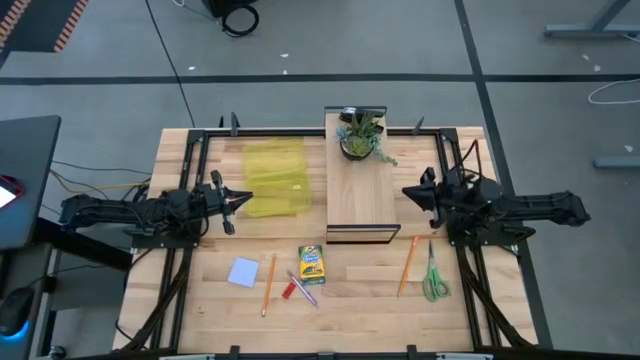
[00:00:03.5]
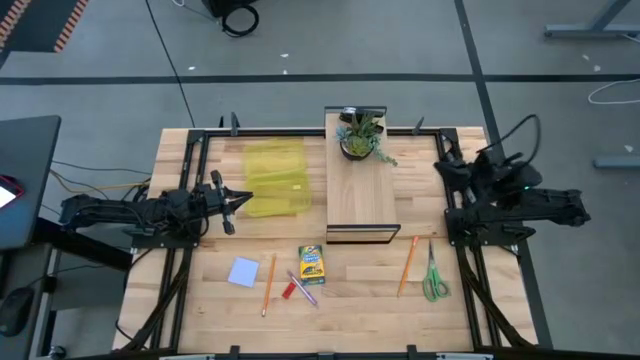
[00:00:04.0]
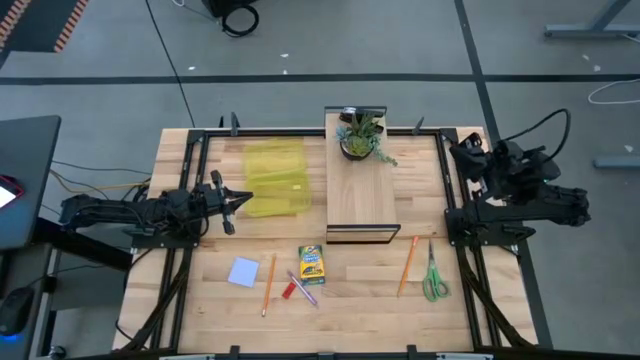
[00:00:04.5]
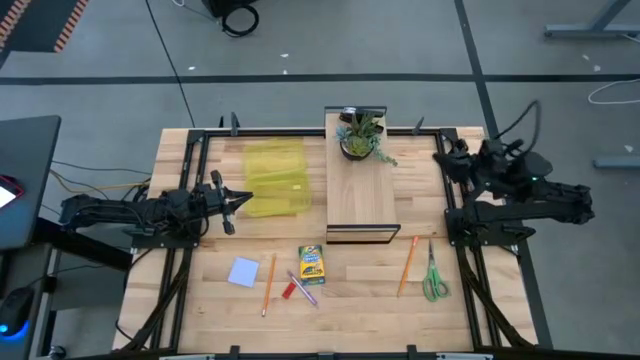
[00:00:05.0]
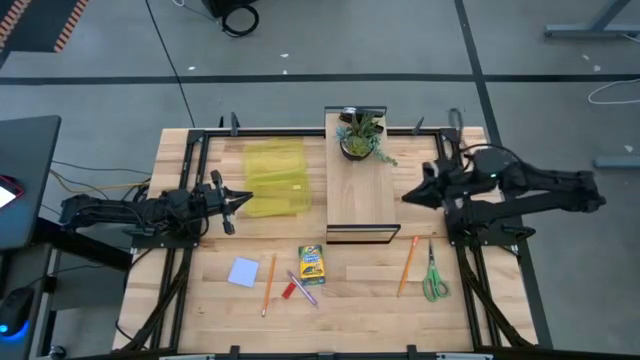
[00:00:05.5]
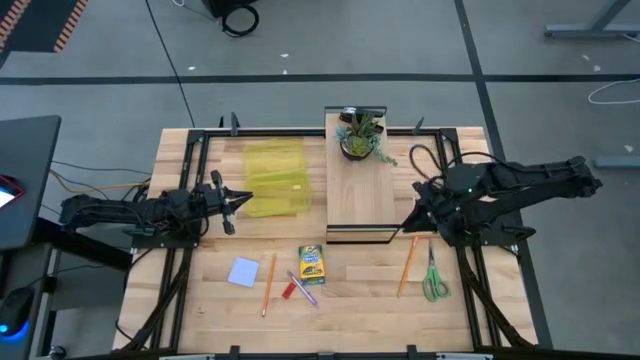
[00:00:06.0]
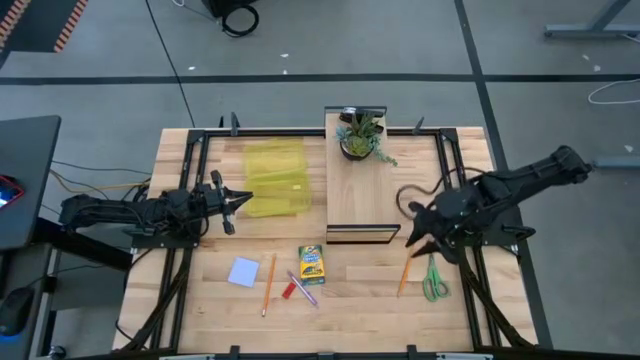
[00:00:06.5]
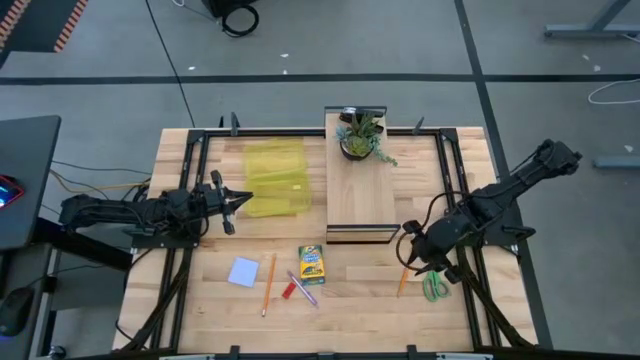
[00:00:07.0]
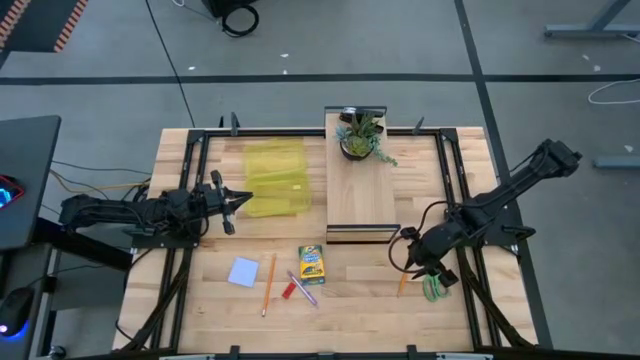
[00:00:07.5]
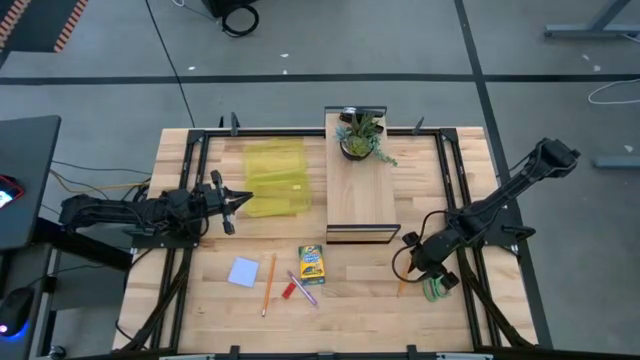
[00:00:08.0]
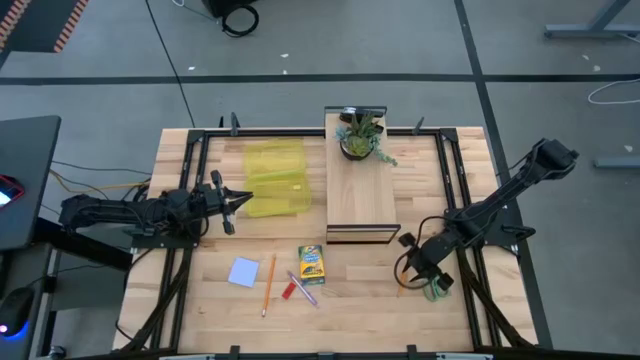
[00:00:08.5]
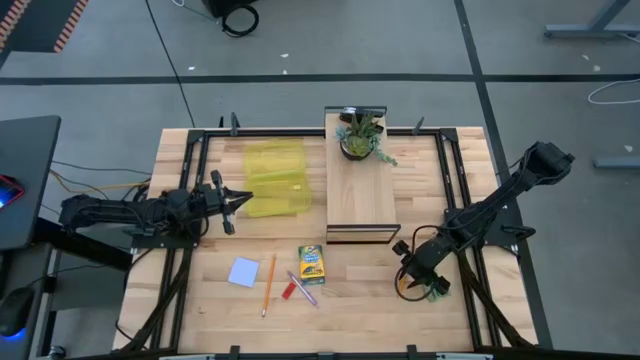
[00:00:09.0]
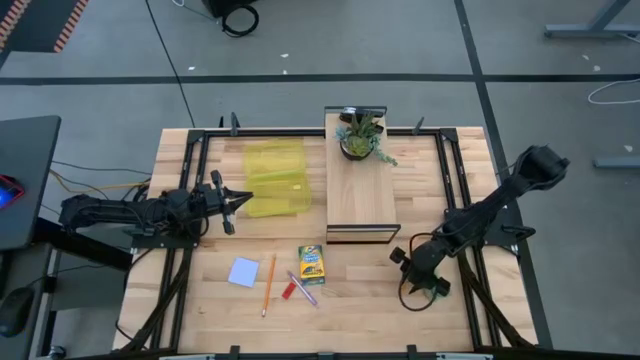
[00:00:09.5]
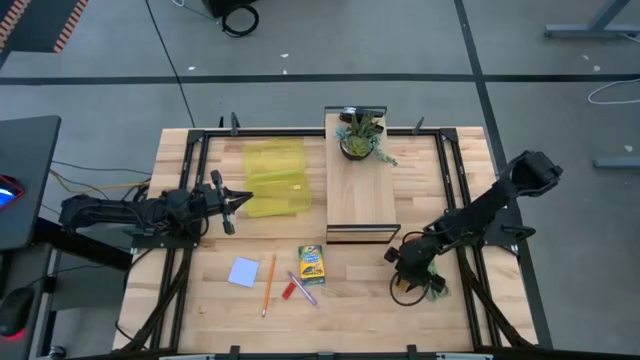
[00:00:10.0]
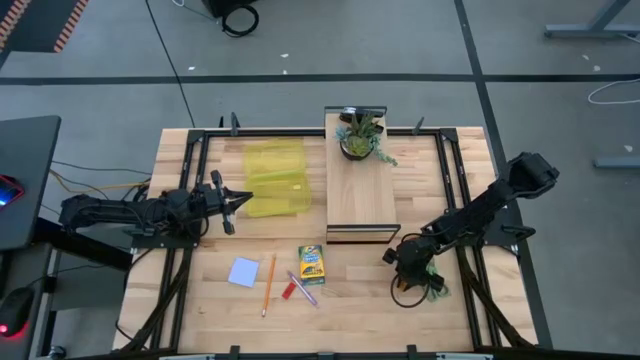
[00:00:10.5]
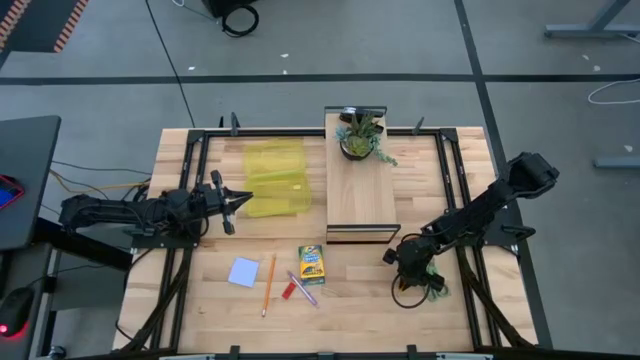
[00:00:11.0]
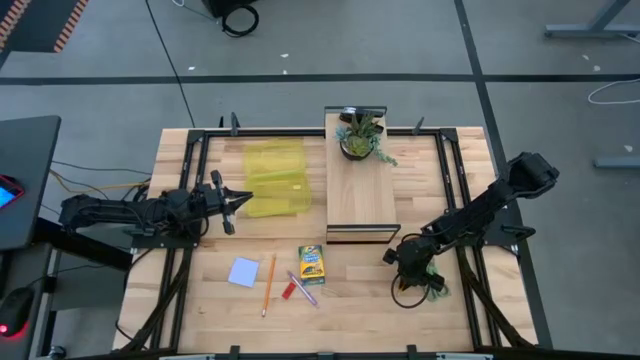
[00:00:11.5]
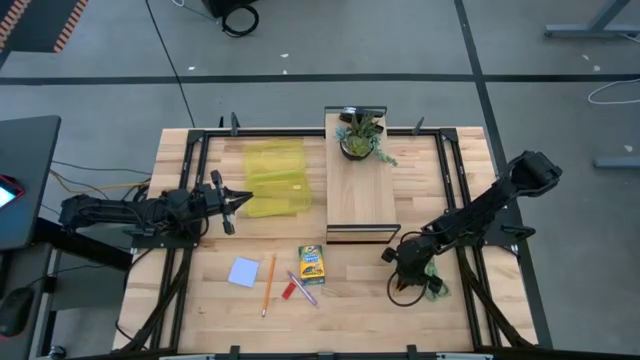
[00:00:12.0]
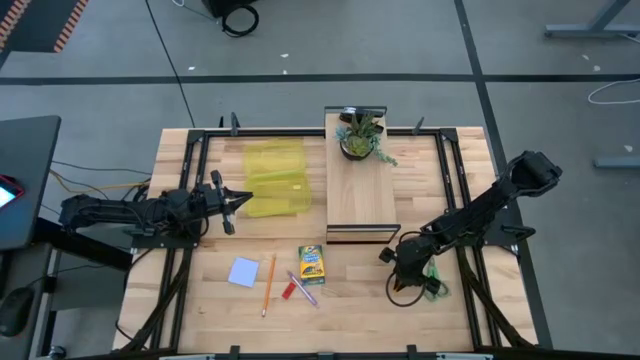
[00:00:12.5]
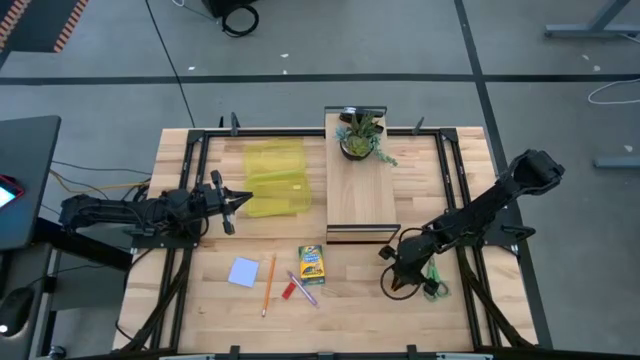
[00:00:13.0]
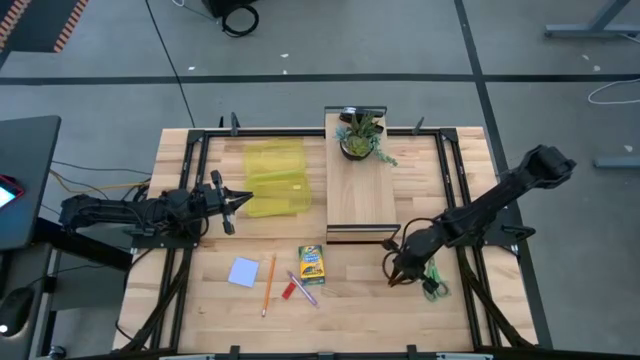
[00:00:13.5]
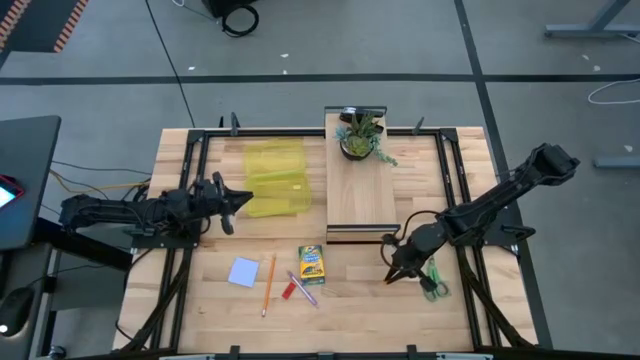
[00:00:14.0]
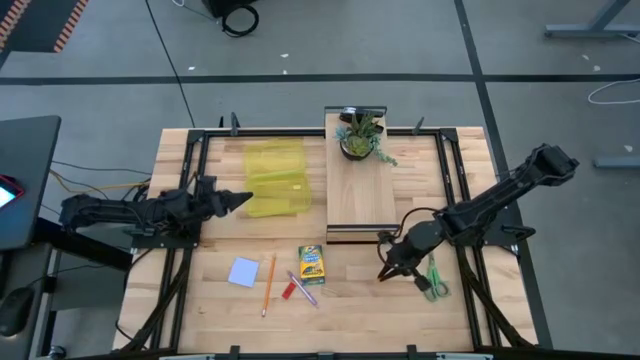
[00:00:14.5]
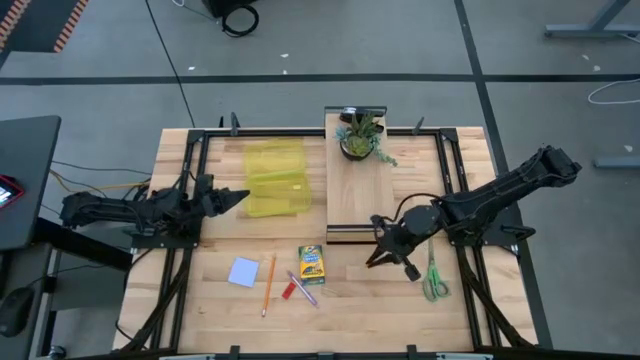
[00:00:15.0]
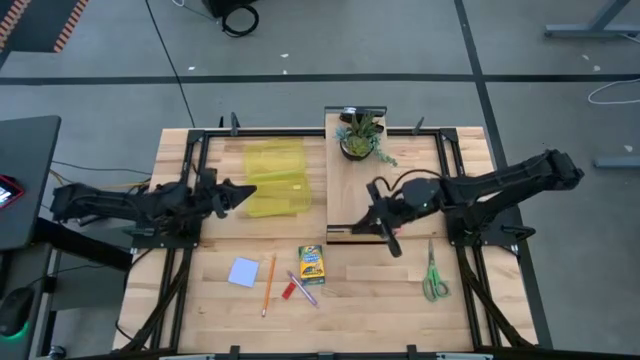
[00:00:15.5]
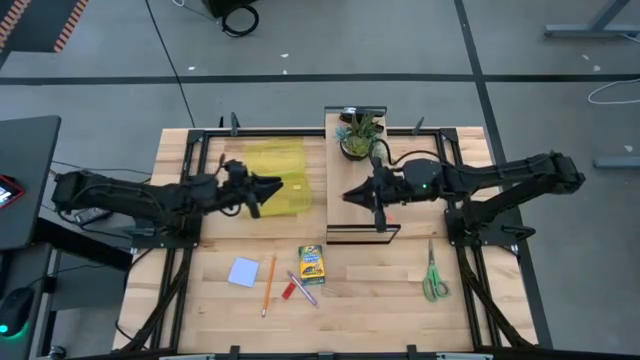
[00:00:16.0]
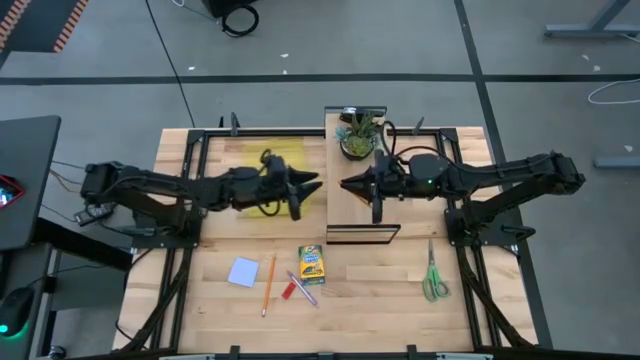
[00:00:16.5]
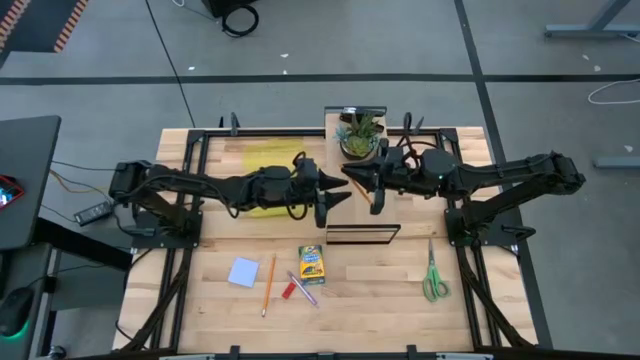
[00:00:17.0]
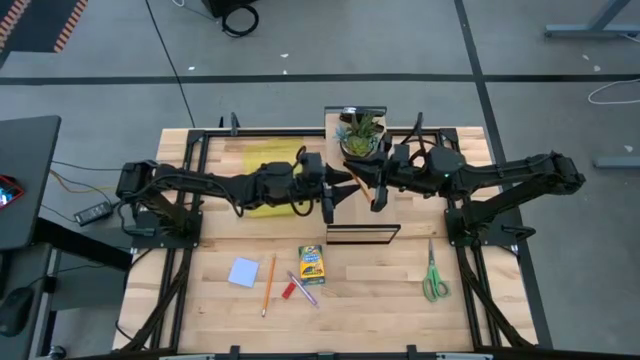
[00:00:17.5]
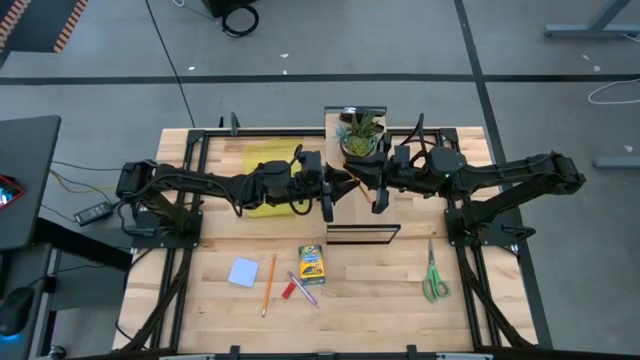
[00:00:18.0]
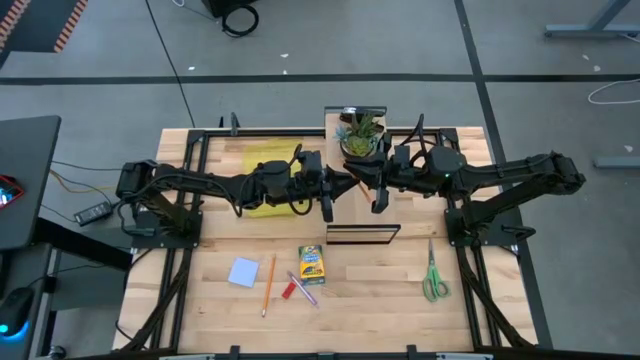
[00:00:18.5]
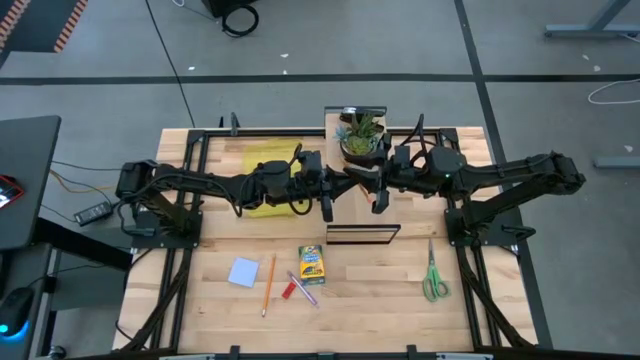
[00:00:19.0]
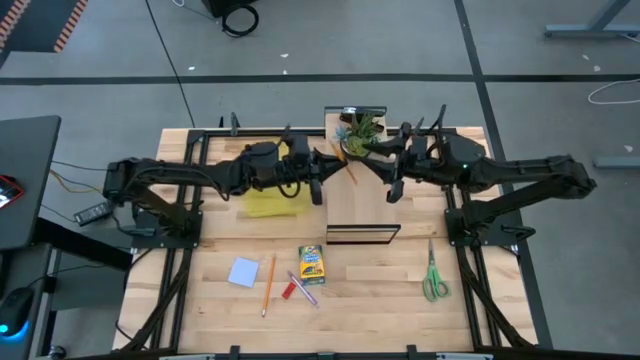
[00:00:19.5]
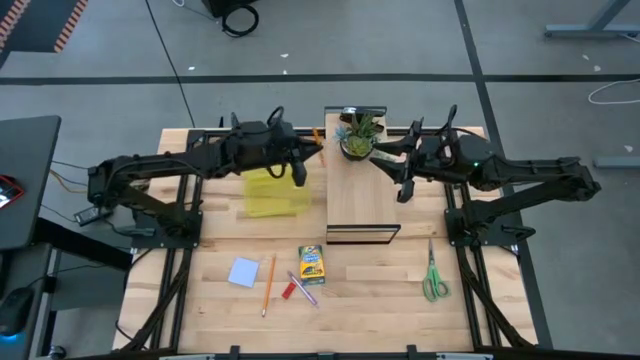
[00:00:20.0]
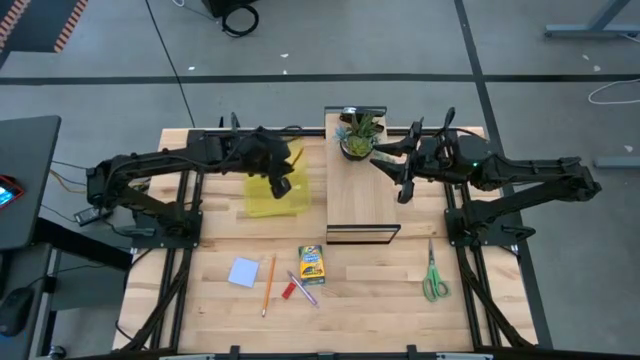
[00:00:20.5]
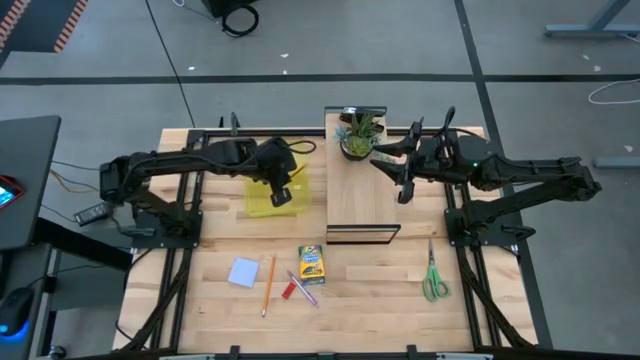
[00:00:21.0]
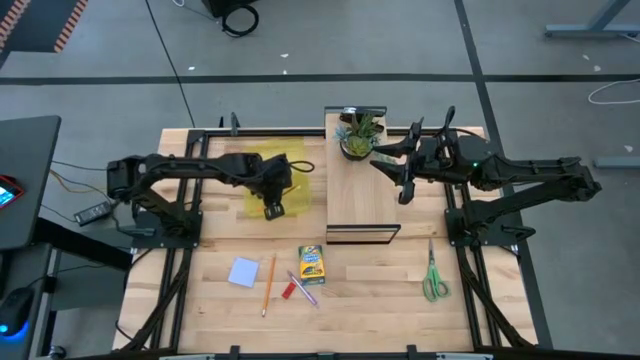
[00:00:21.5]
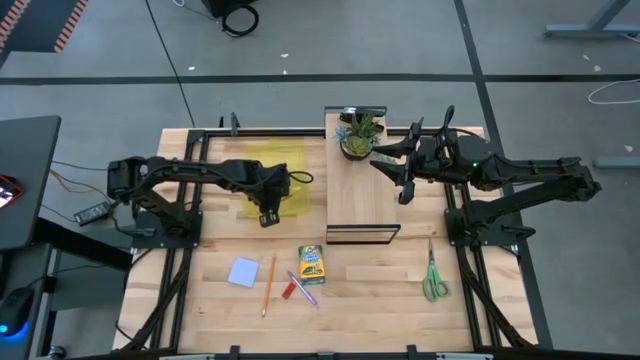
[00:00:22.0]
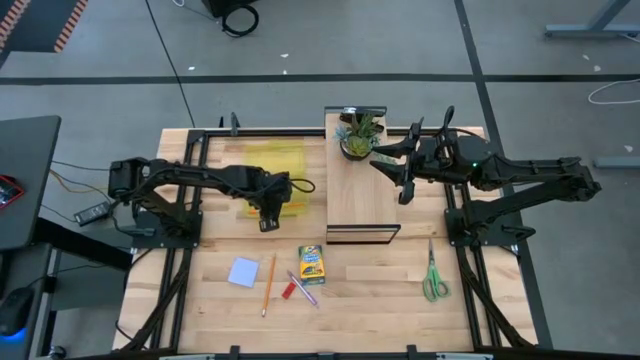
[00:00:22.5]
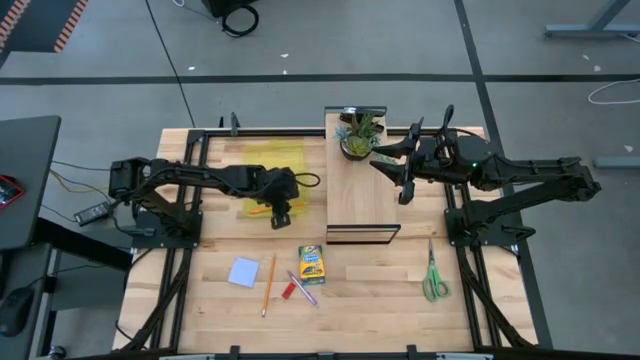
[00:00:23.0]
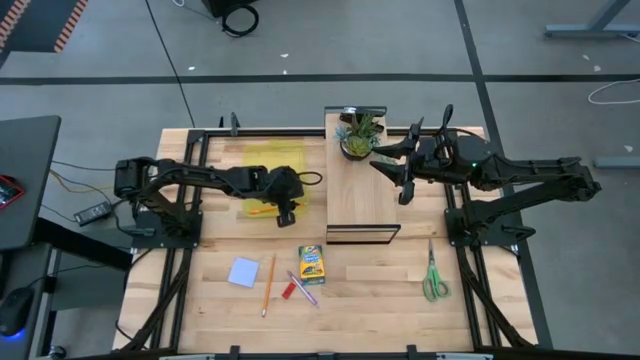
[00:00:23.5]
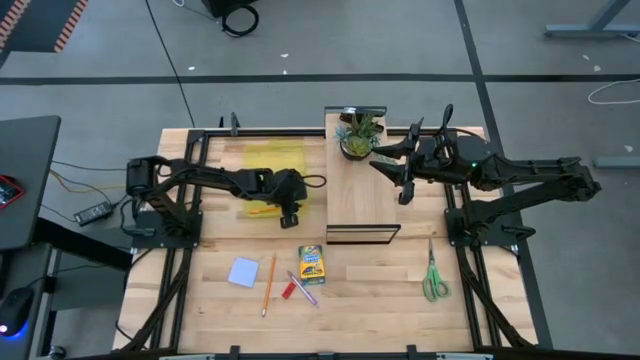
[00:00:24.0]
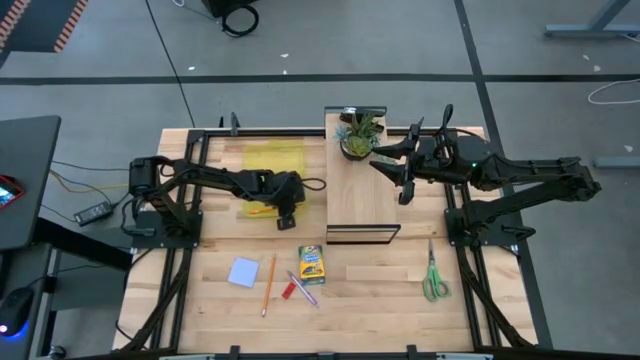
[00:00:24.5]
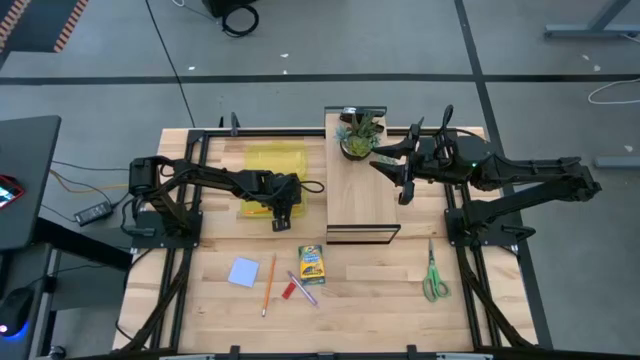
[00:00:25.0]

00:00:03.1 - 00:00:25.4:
Task: Pack school essentials
Put the orange pencil into the yellow supply box
